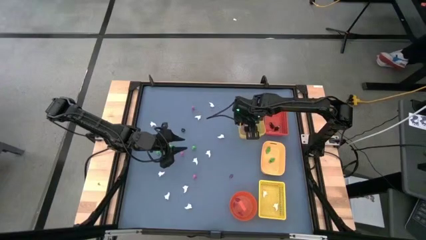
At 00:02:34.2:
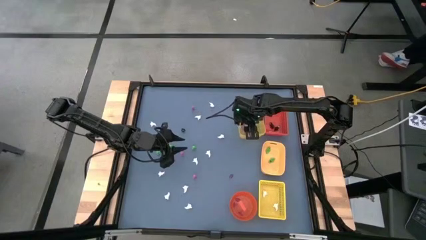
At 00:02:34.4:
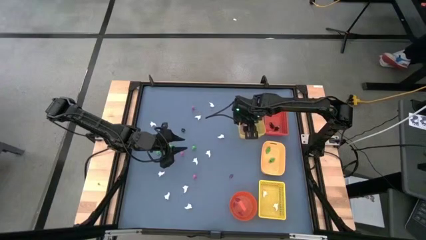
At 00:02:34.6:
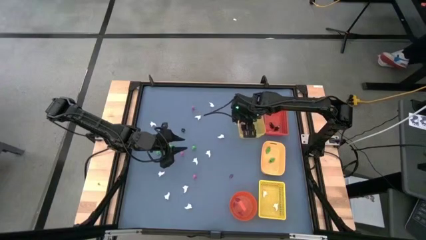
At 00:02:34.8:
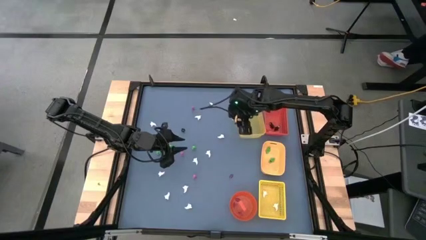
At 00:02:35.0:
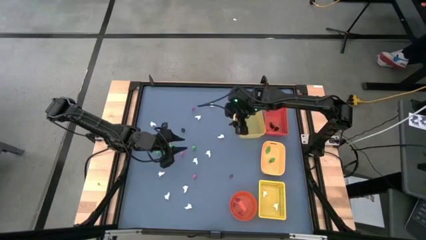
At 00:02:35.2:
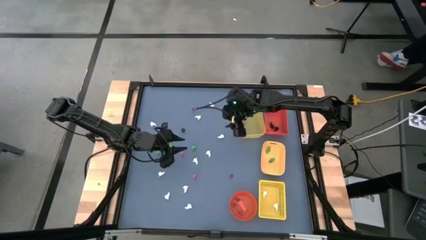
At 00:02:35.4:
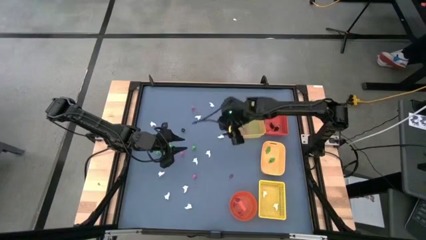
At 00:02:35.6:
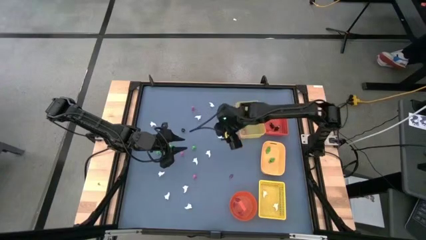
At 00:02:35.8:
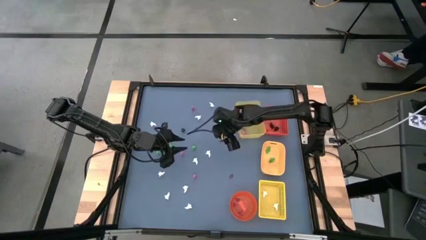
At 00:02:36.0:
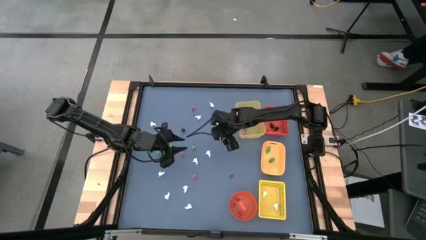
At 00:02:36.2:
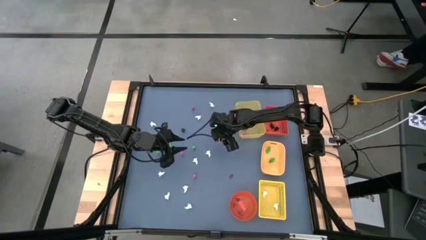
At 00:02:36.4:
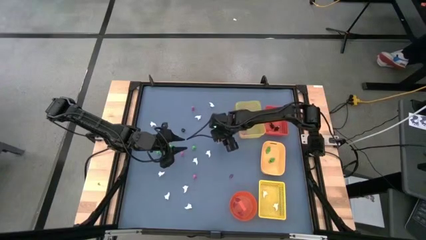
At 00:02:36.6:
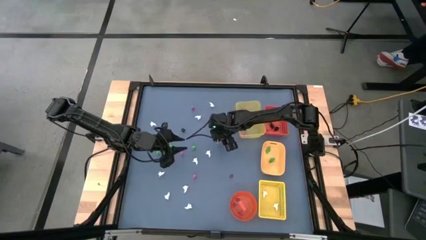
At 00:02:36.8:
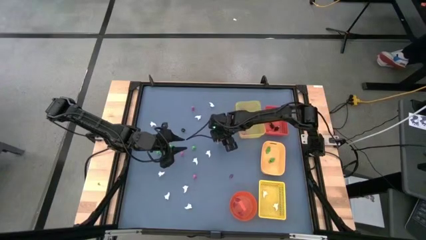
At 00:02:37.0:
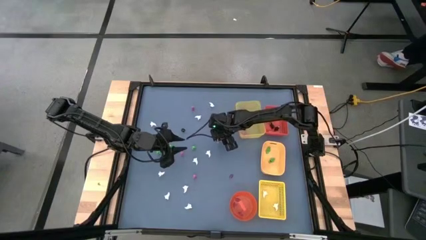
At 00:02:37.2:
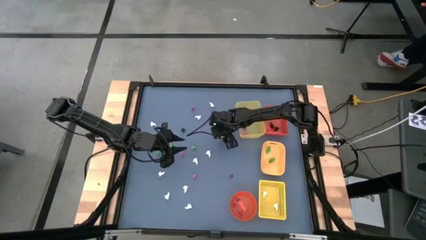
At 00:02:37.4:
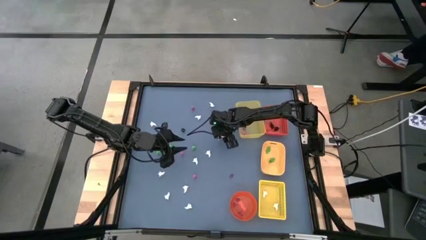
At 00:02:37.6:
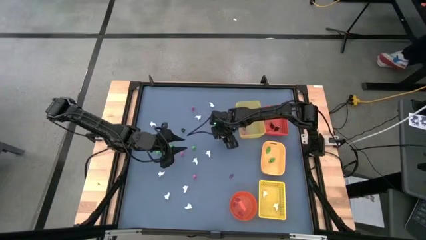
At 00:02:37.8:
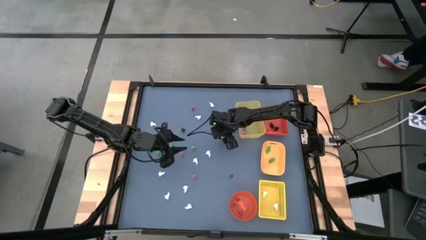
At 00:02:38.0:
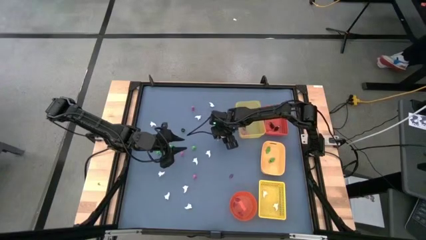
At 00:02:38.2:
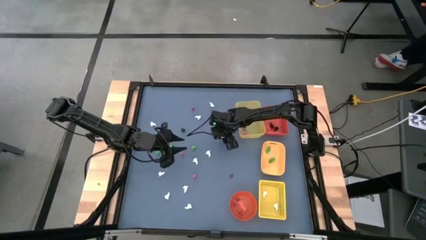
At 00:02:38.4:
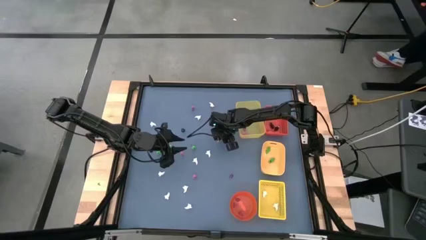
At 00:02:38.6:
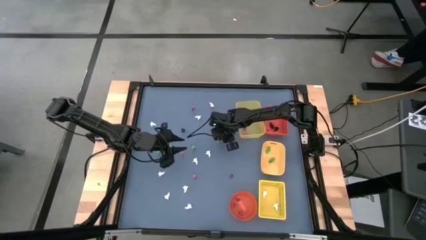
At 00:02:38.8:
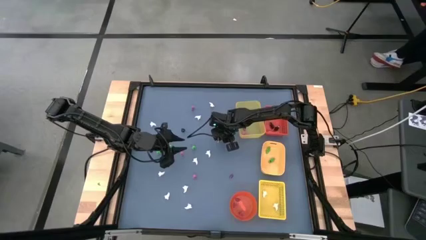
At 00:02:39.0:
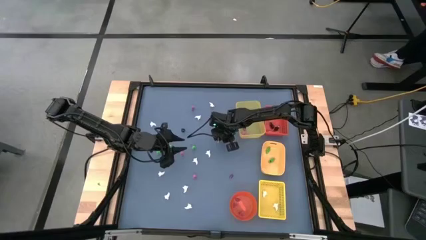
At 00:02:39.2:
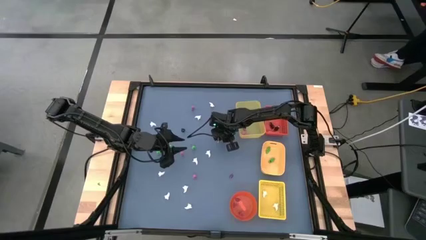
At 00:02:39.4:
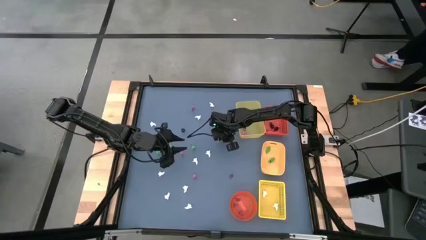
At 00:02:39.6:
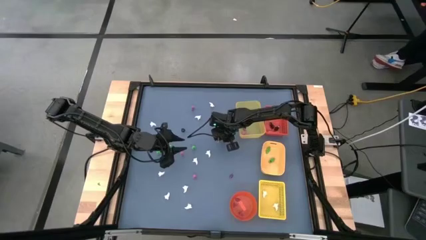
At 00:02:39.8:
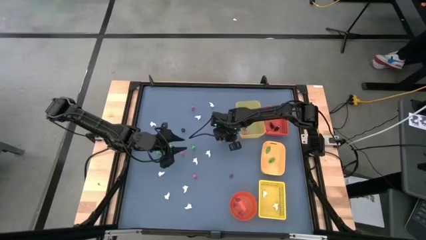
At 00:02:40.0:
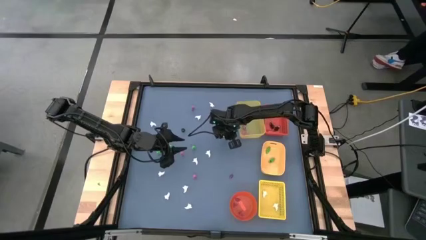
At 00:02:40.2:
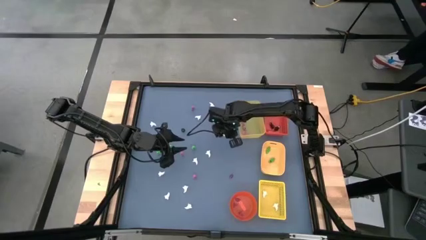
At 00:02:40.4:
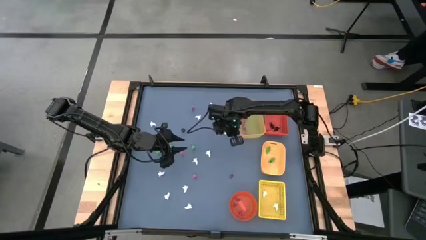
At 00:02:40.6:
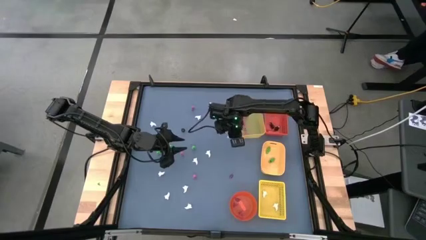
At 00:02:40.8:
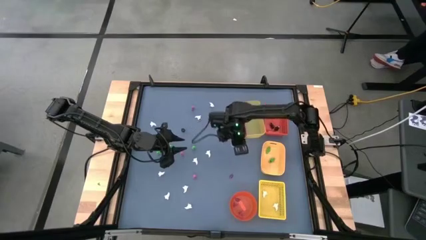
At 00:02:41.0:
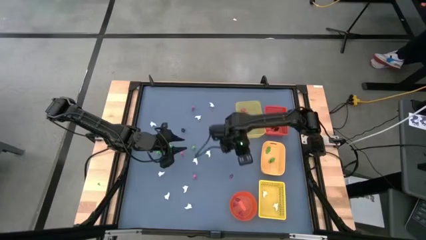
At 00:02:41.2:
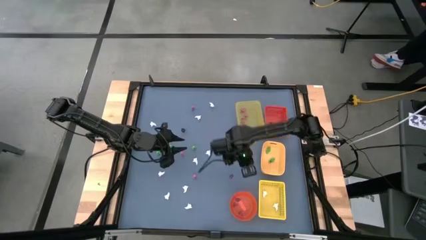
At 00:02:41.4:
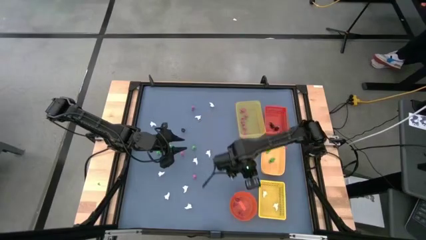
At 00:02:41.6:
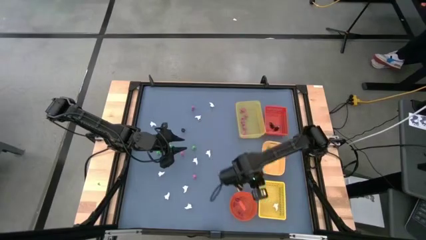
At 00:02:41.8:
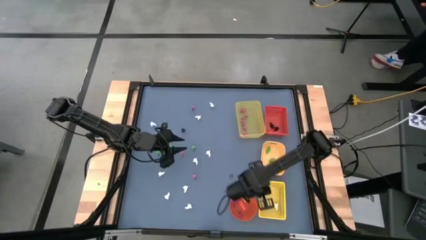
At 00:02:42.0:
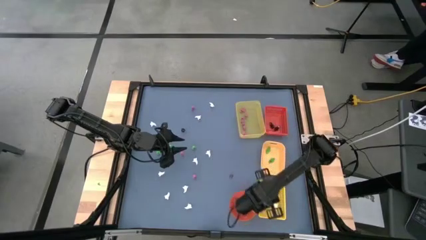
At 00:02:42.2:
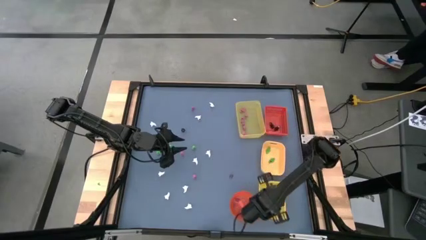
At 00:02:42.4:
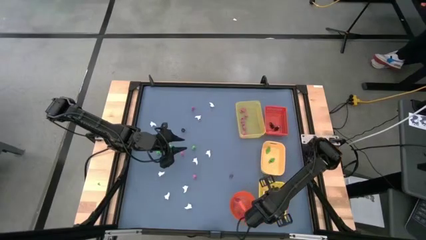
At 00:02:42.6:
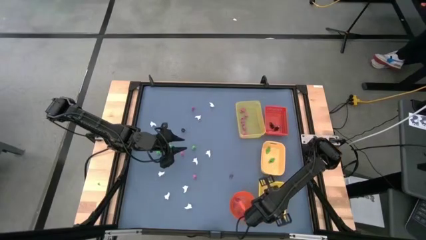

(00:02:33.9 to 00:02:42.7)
Task: Sort Halloween decoration
Put the white ghost toy into the yellow box

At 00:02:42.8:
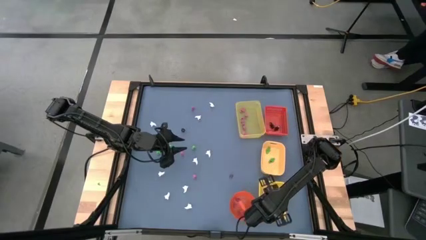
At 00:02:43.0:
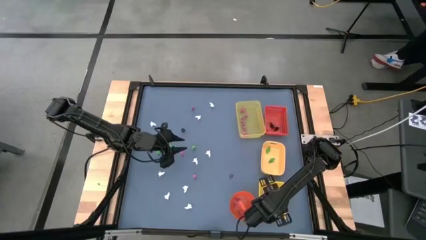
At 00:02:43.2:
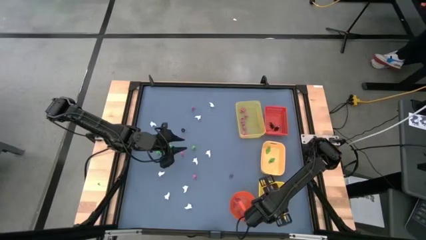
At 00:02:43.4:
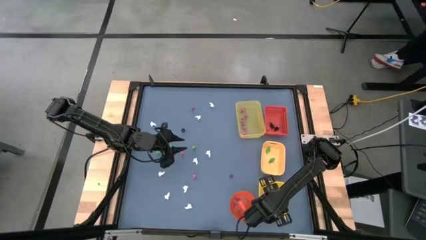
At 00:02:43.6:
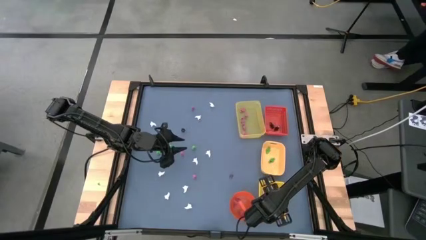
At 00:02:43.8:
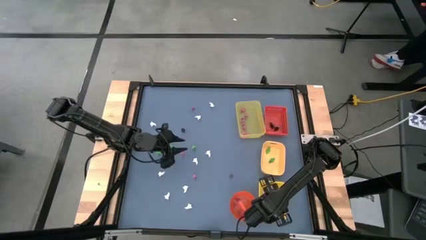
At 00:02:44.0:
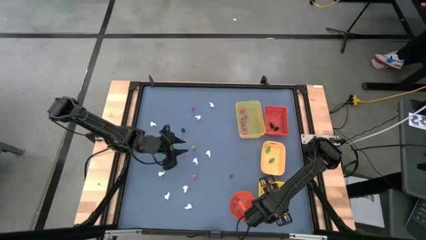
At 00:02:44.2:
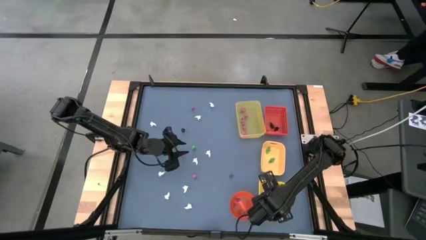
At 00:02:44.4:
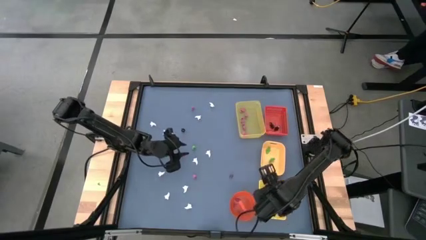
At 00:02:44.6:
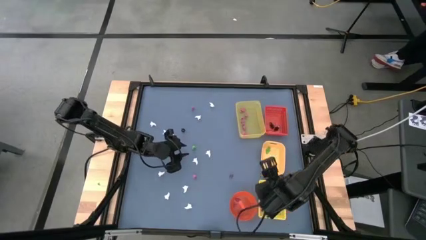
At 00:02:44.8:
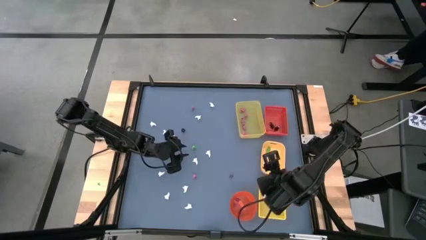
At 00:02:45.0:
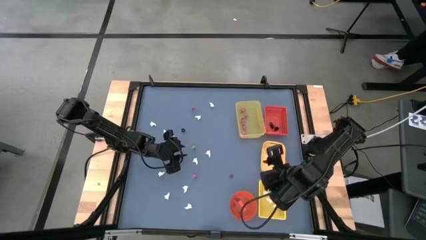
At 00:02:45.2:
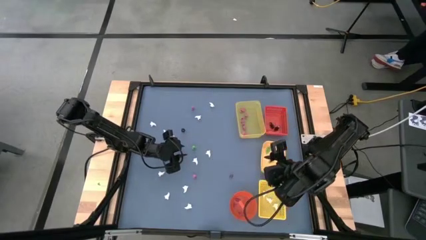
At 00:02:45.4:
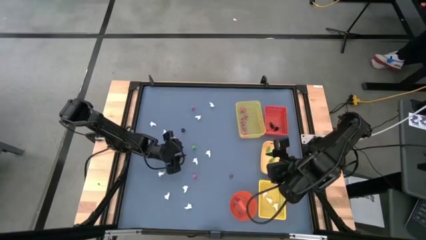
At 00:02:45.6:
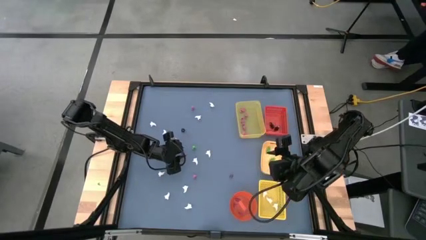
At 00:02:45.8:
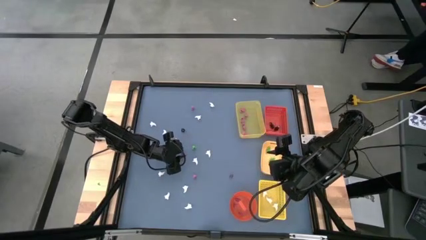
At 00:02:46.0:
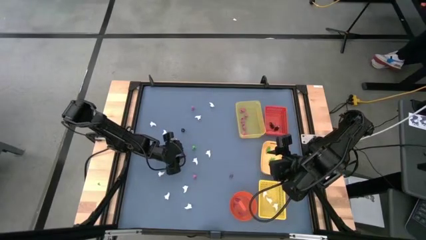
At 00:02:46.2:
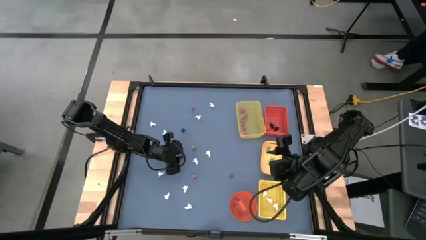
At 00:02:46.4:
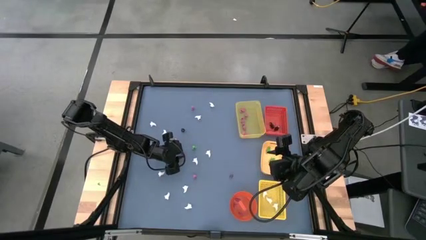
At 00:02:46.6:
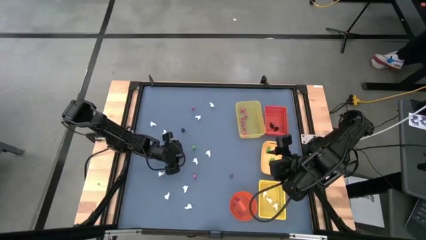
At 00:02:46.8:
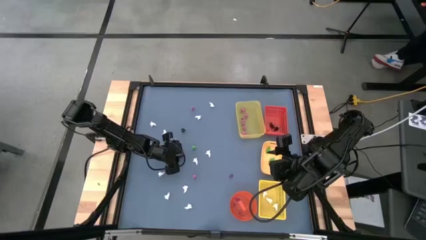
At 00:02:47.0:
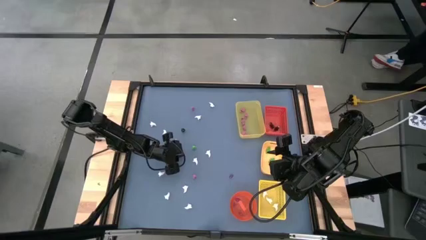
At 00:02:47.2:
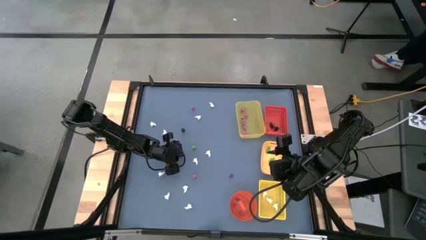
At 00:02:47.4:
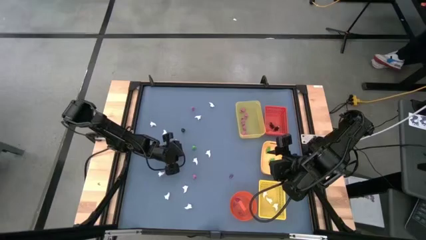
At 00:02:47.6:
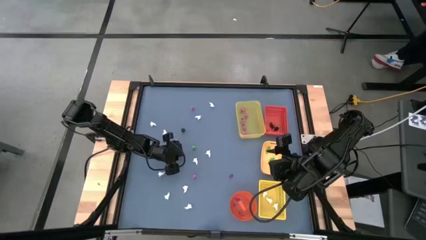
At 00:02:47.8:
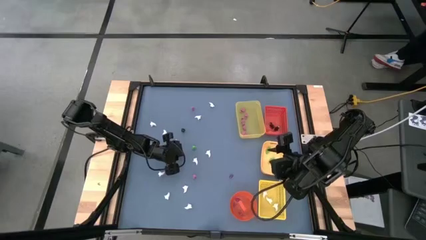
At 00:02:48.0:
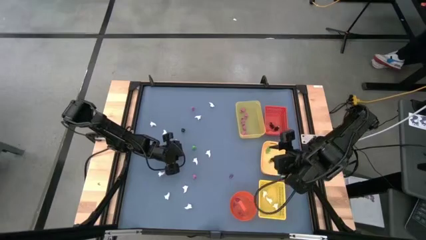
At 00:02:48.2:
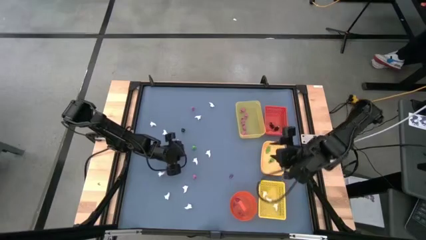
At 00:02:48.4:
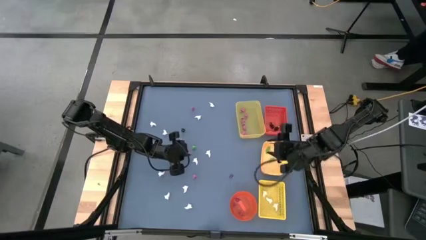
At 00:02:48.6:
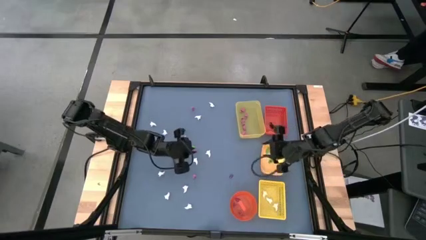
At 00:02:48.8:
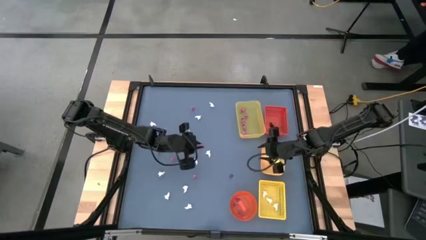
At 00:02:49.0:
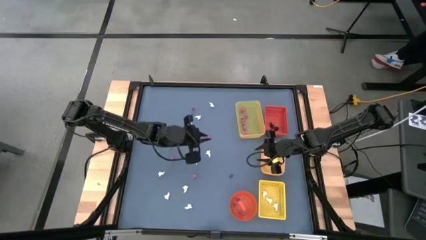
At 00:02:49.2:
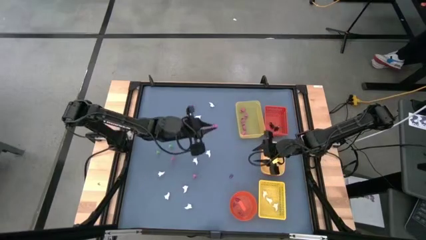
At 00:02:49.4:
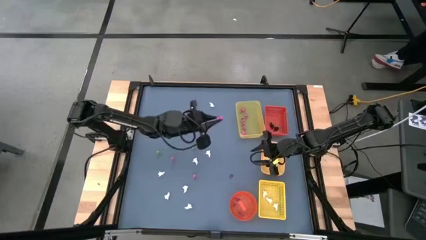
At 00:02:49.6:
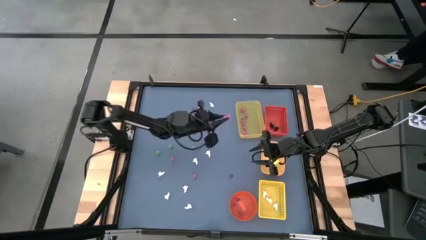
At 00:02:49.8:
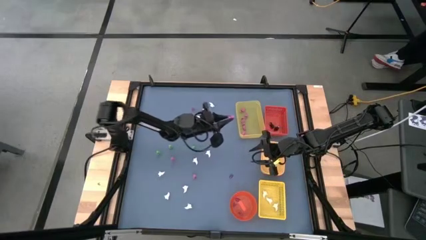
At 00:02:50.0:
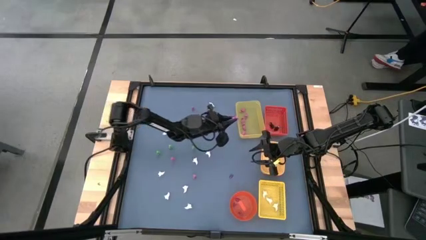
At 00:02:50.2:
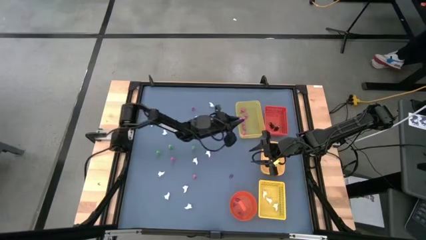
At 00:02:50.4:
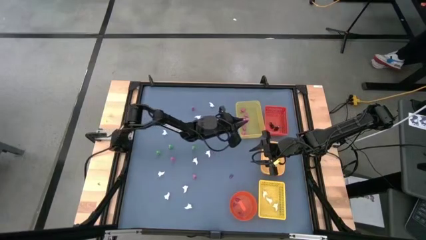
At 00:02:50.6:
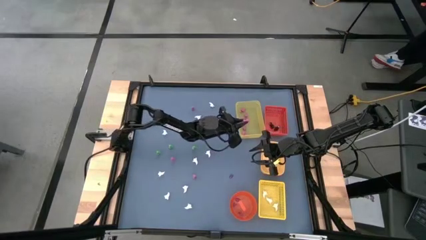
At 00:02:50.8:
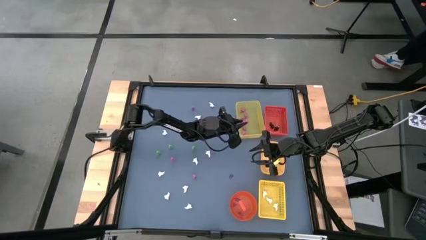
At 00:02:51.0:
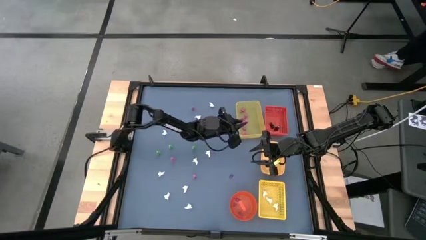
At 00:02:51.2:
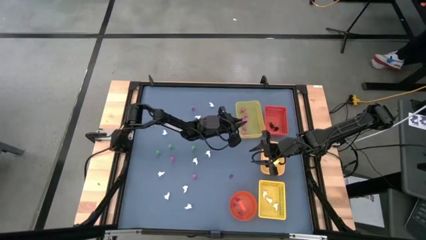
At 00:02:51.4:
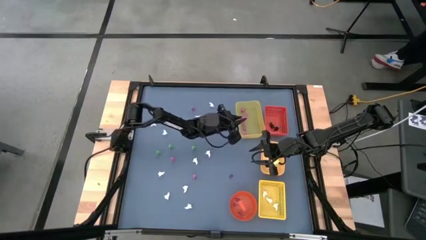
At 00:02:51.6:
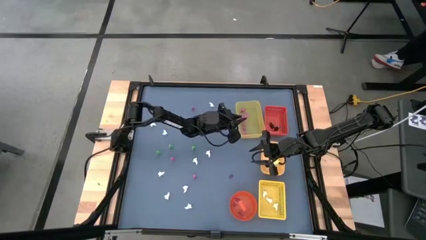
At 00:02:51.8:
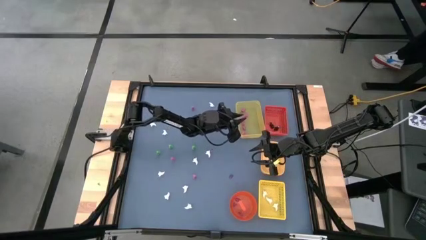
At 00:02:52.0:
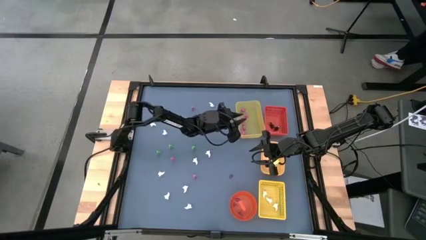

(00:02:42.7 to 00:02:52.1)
Put the pink skeleton toy into the top yellow bin
